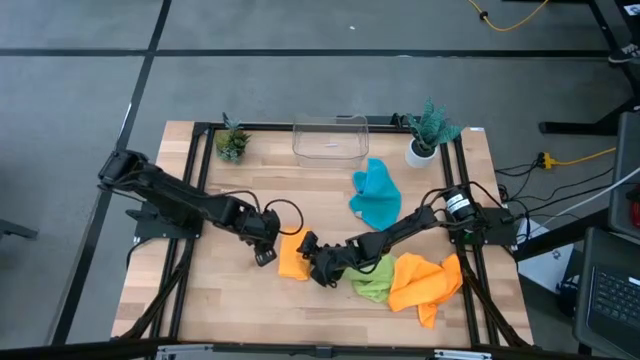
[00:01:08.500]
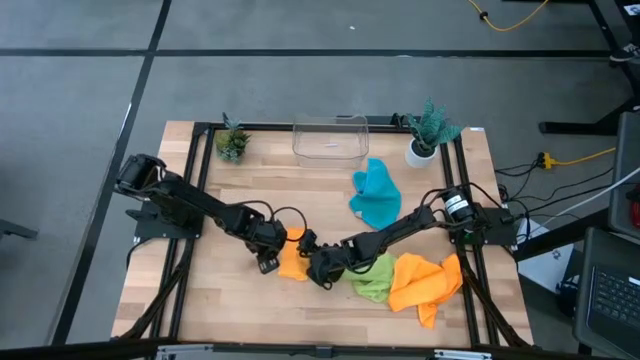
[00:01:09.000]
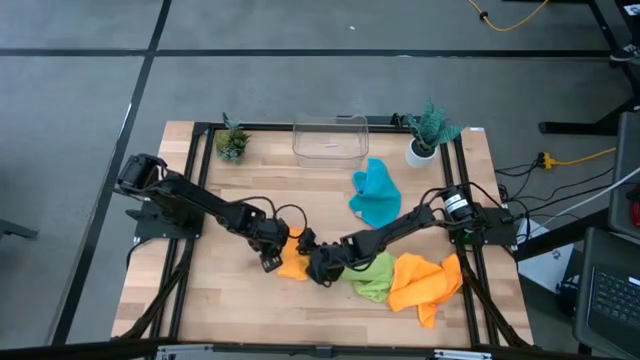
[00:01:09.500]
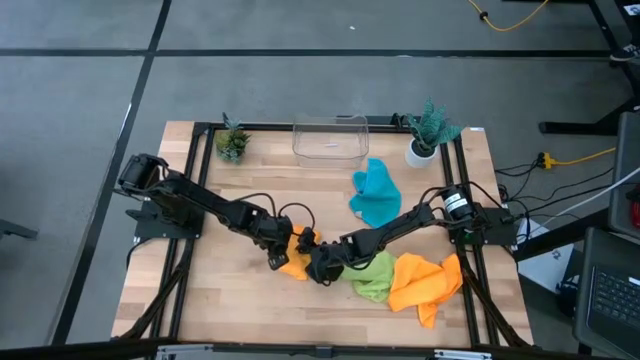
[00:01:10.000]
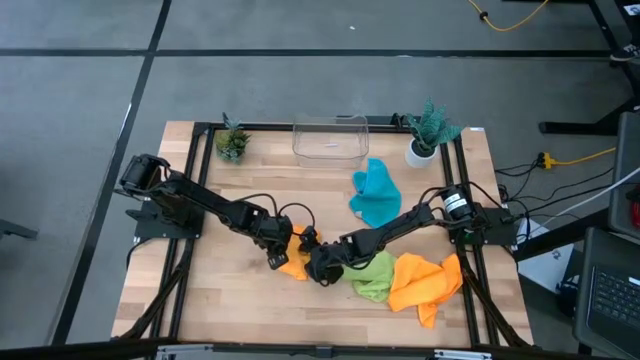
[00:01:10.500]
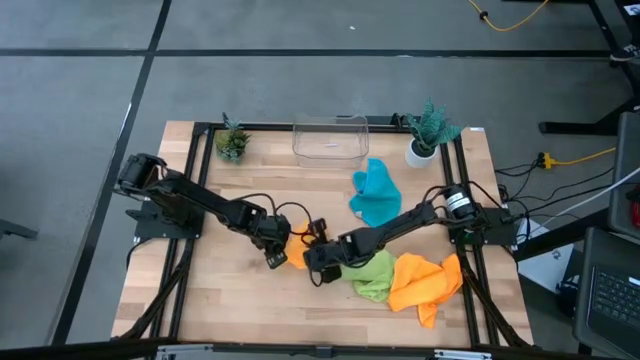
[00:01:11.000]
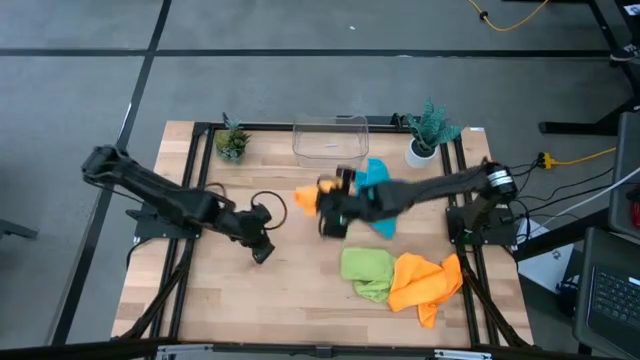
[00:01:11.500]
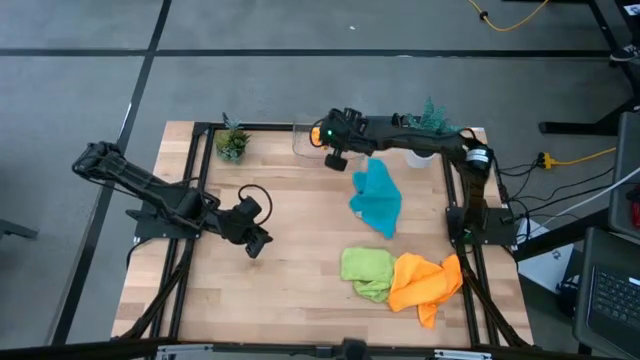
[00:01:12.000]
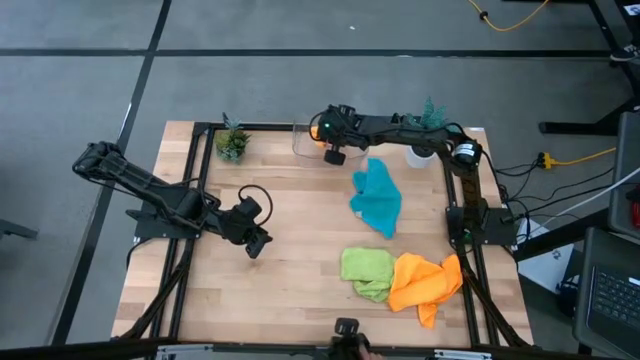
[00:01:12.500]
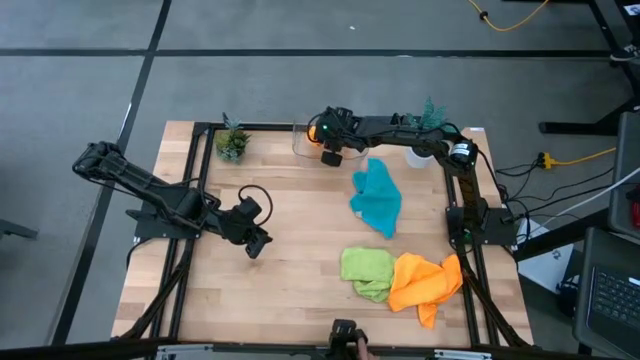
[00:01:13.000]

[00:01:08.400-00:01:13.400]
Task: Fold microfiber towels
Put the folded orange towel into the transparent bin

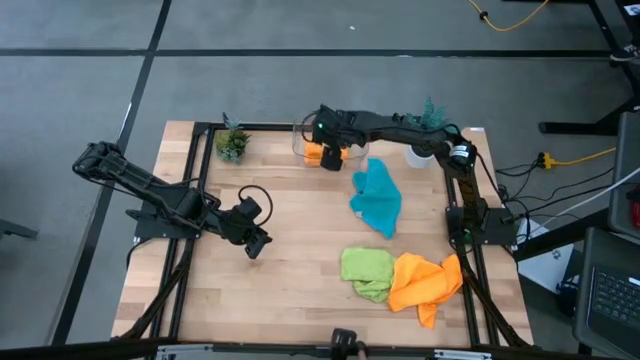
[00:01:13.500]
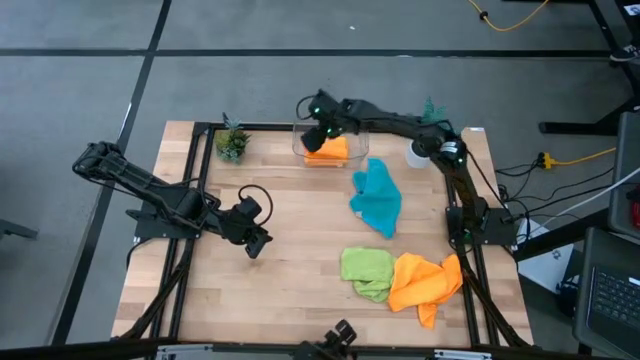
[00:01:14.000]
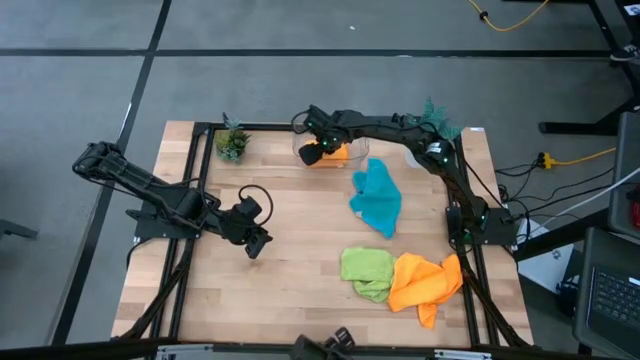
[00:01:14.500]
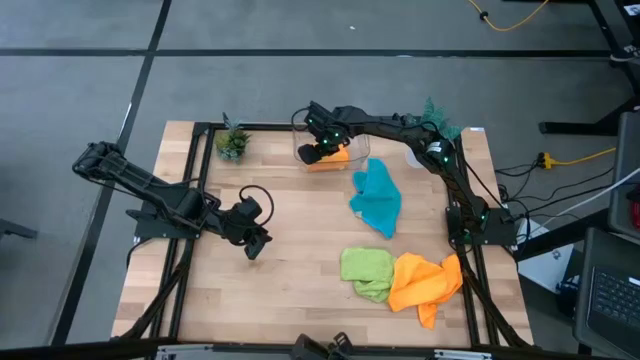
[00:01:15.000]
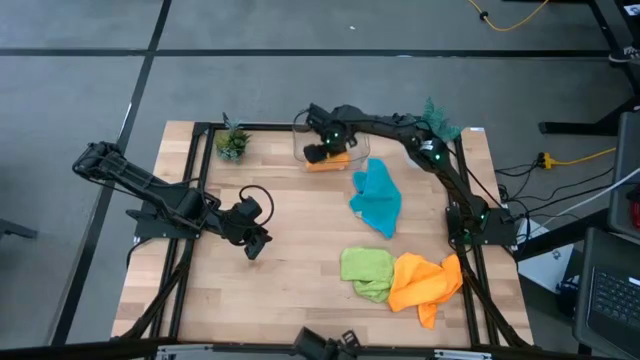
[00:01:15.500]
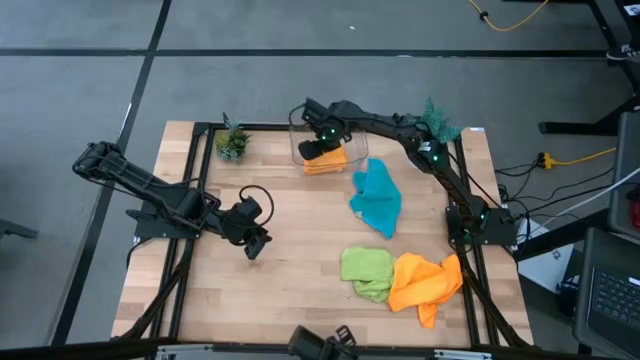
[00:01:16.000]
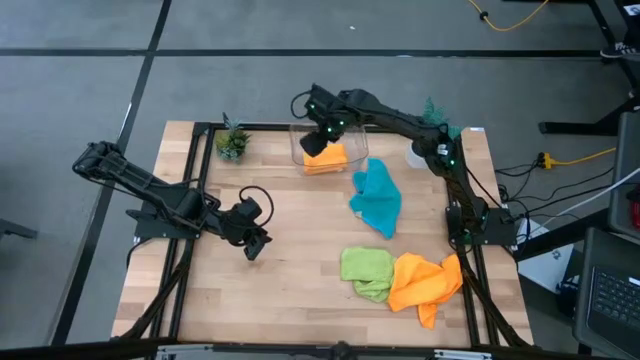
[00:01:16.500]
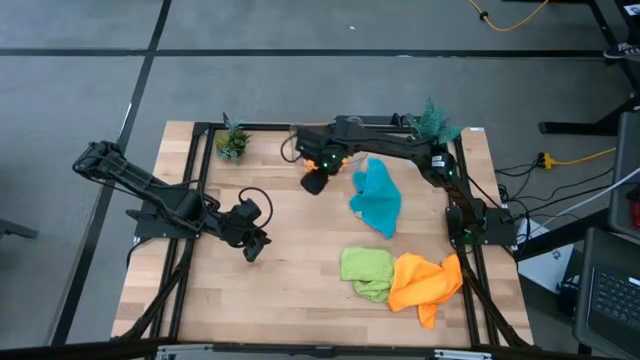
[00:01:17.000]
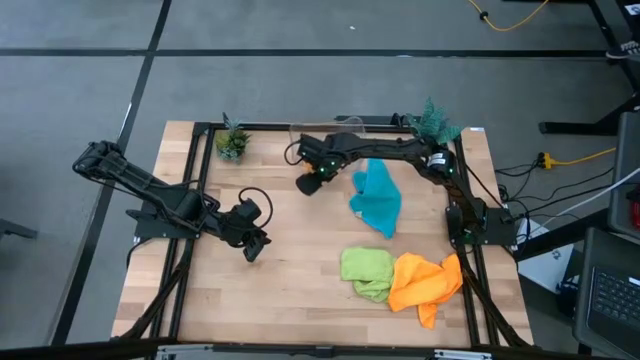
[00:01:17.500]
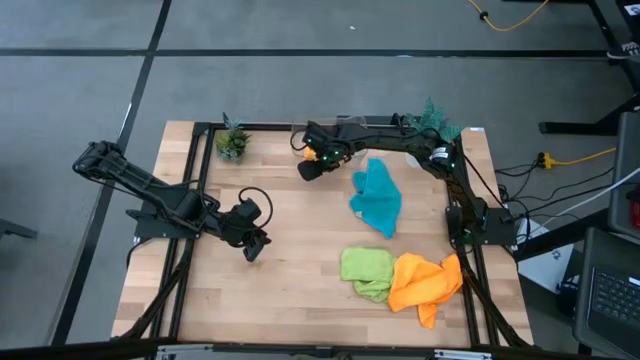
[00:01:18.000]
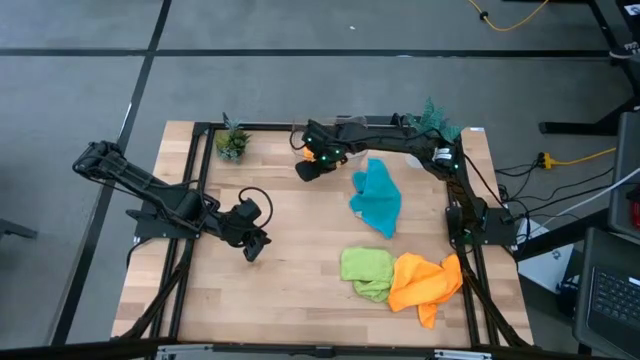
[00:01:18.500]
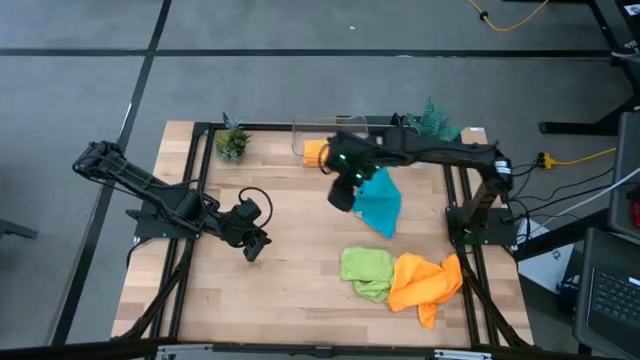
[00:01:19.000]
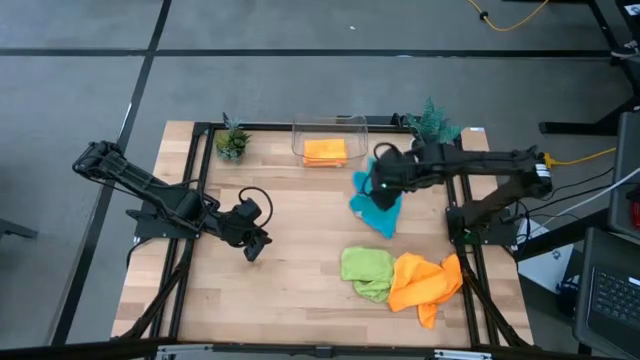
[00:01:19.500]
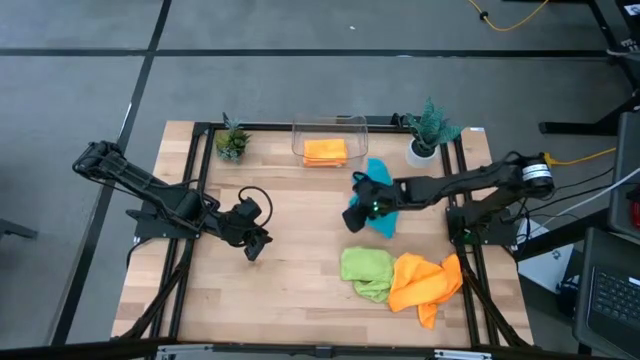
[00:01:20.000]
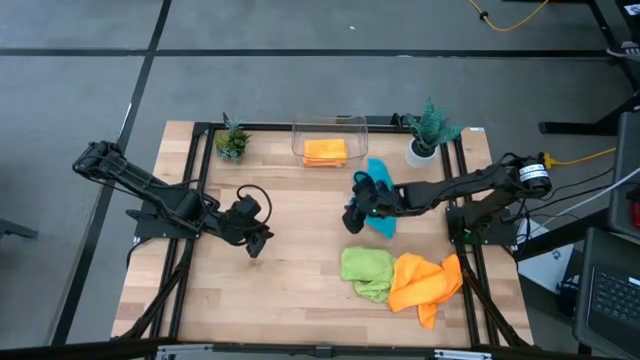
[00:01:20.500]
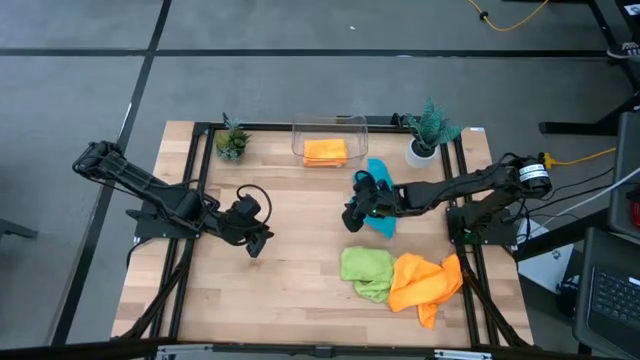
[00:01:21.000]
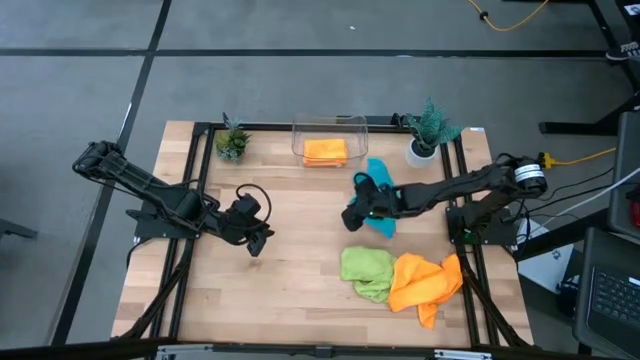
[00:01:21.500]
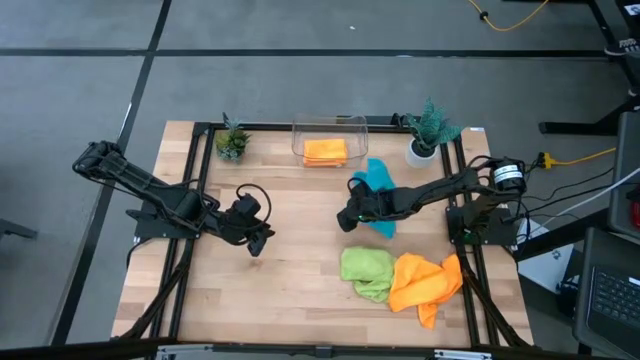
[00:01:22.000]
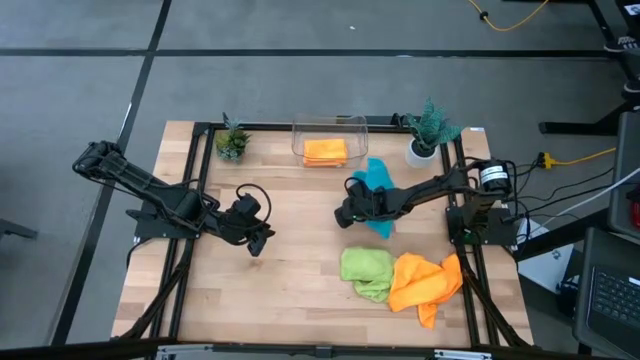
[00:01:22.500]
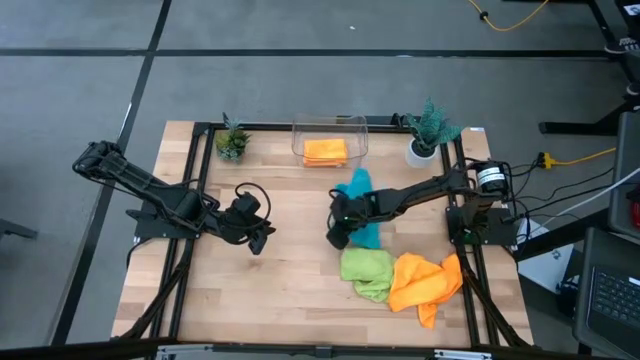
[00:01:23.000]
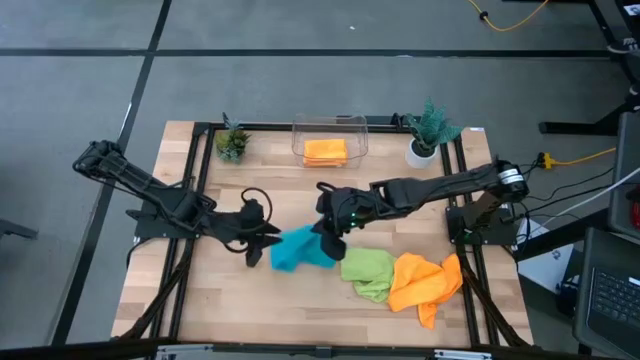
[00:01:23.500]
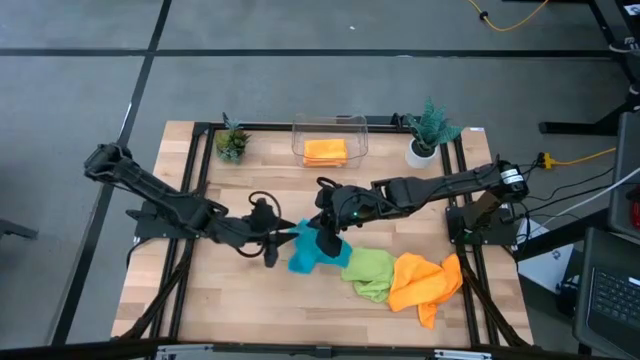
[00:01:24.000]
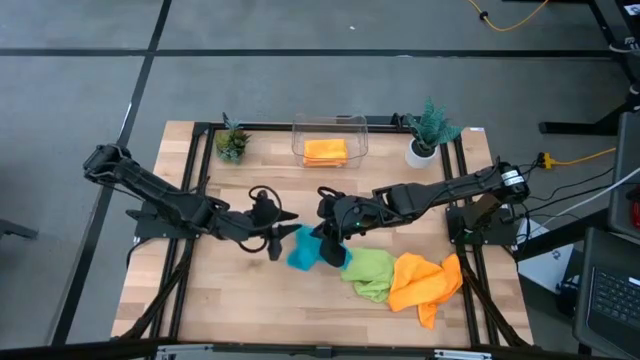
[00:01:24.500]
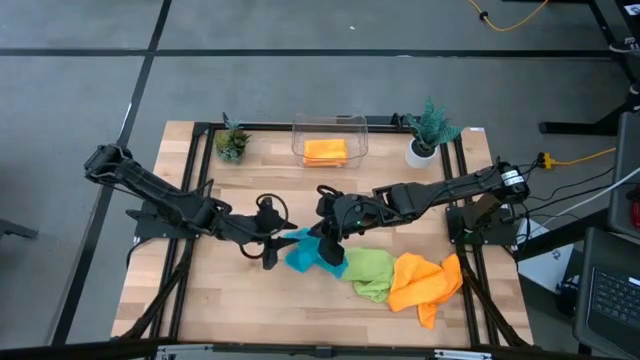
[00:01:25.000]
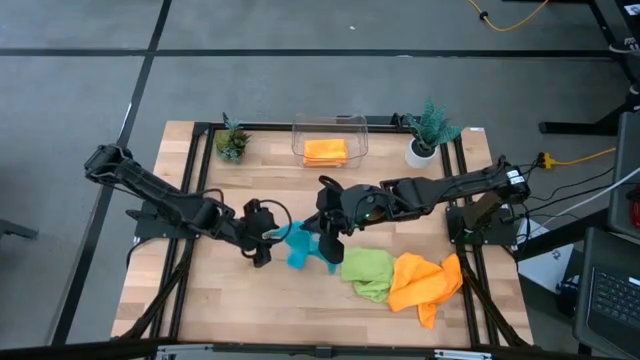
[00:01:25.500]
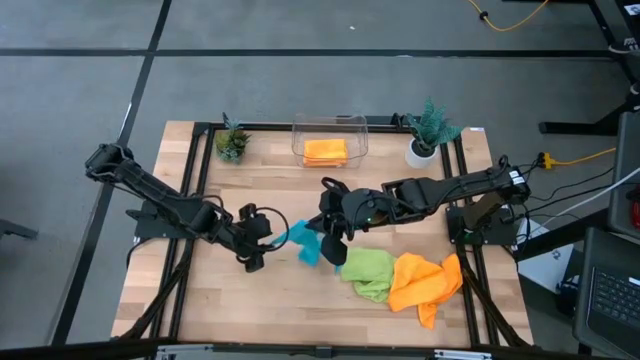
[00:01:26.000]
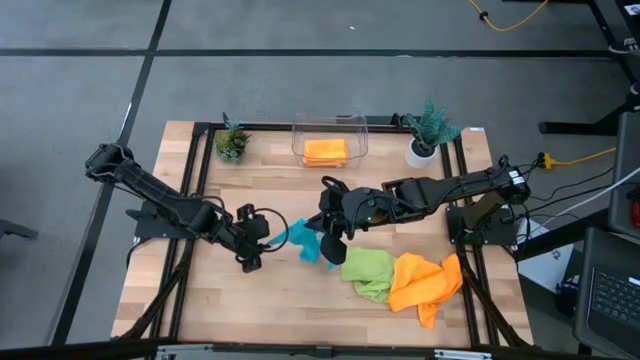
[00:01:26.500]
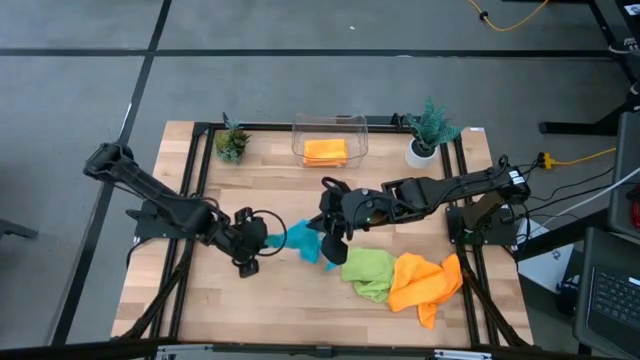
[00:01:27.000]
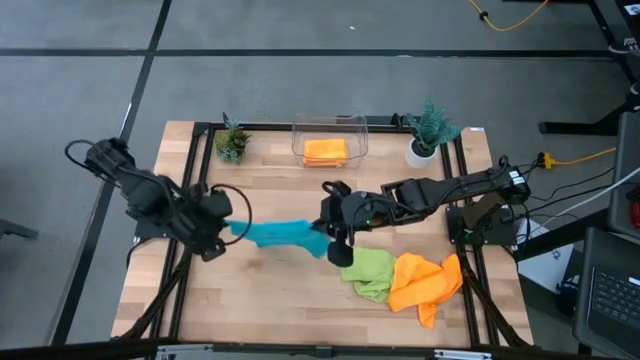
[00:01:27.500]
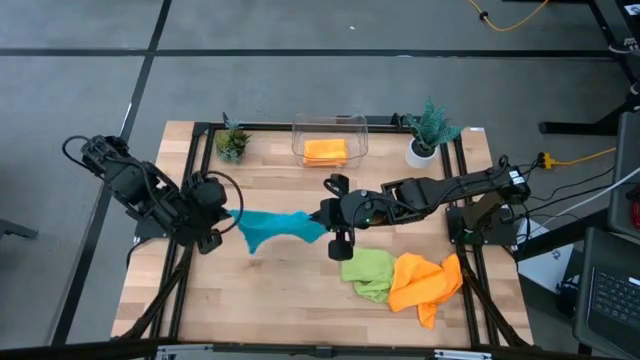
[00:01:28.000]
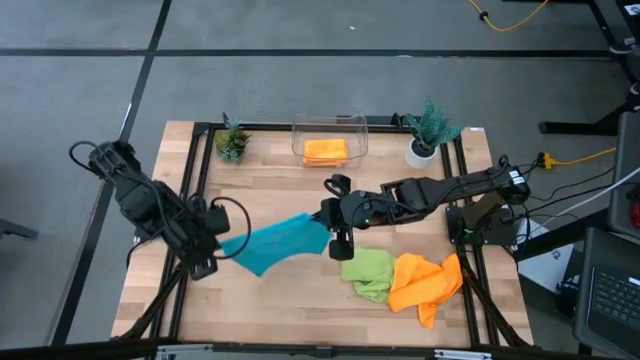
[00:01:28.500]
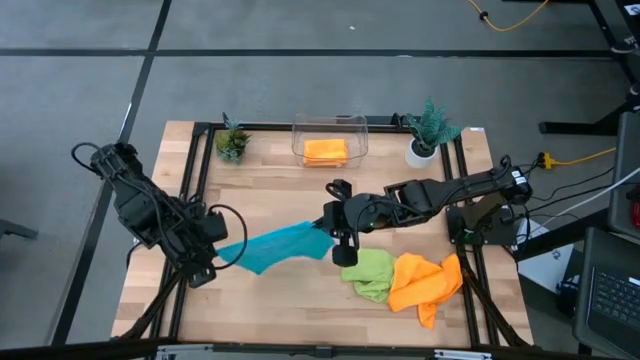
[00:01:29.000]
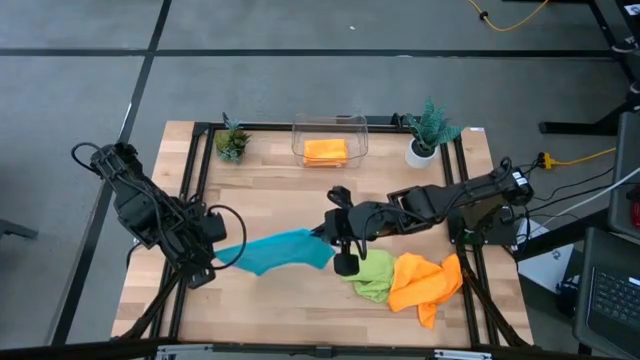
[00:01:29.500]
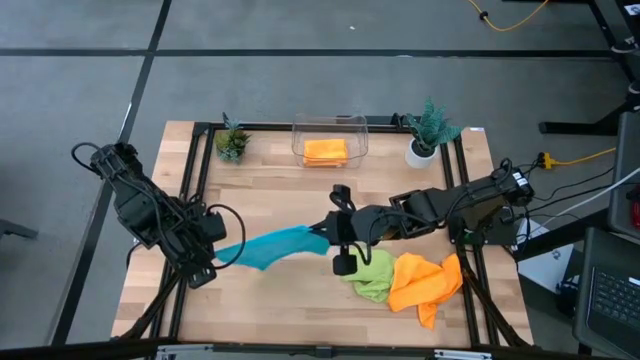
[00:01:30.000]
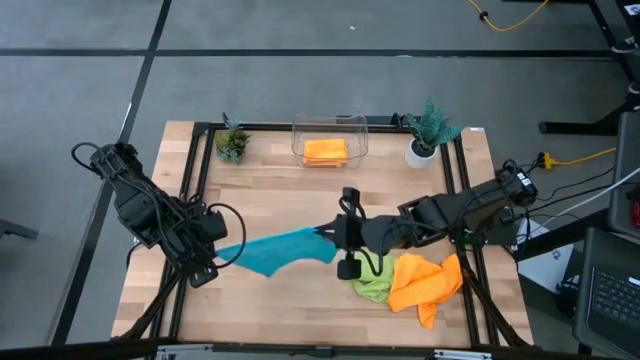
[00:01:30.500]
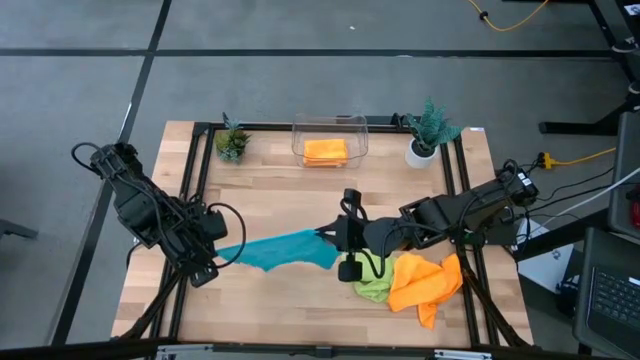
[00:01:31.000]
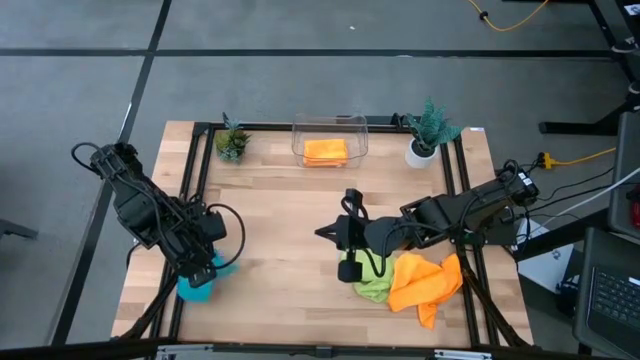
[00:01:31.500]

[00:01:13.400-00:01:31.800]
Fold the blue towel
